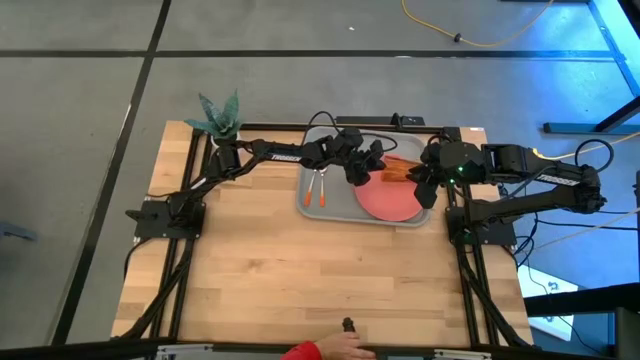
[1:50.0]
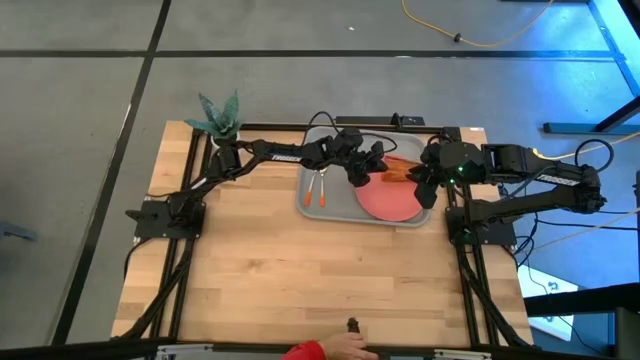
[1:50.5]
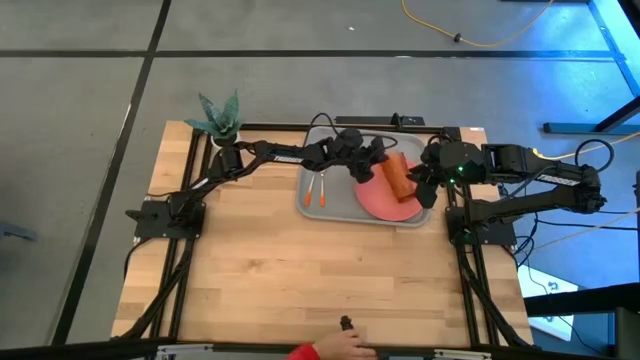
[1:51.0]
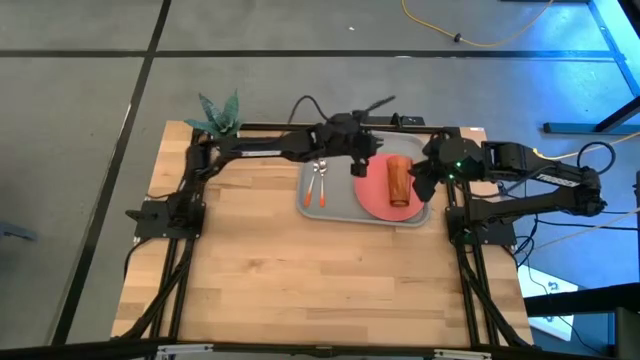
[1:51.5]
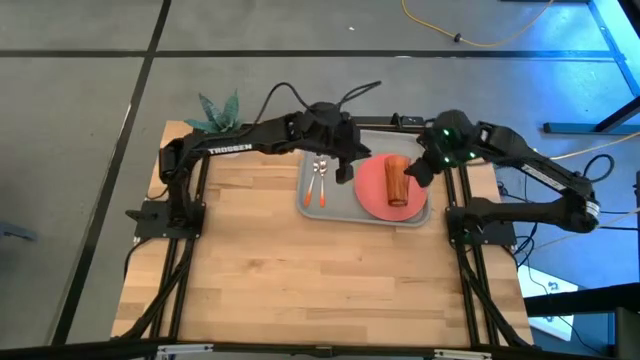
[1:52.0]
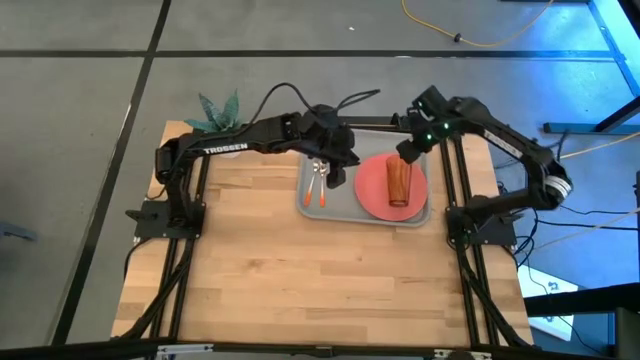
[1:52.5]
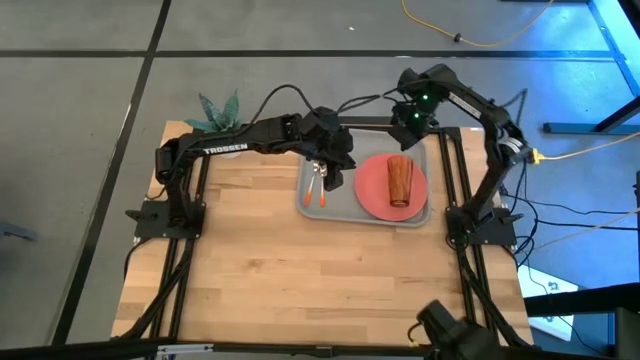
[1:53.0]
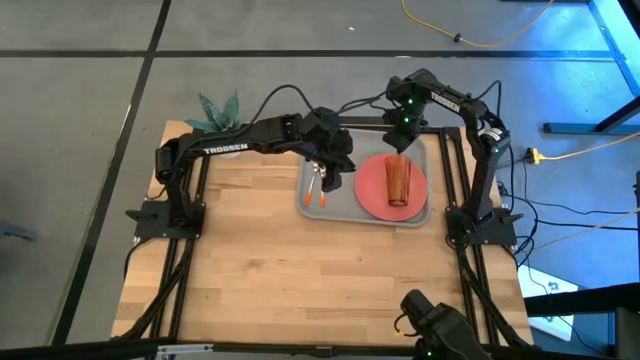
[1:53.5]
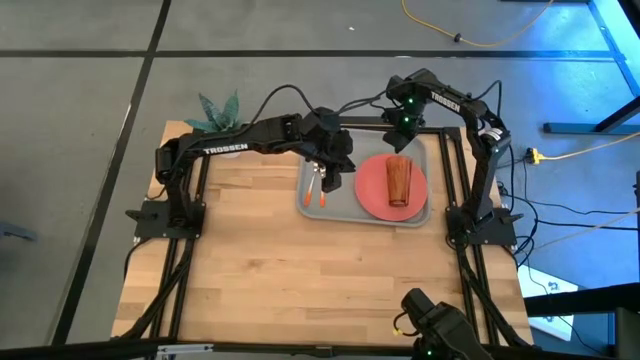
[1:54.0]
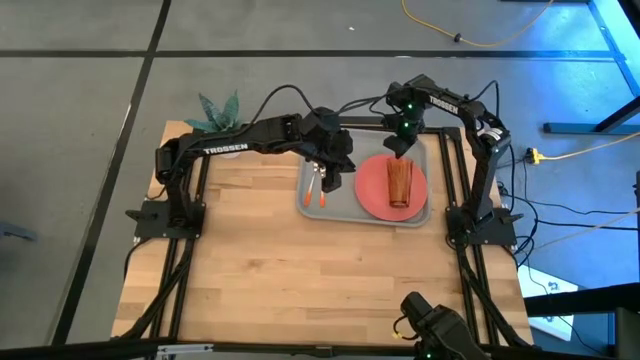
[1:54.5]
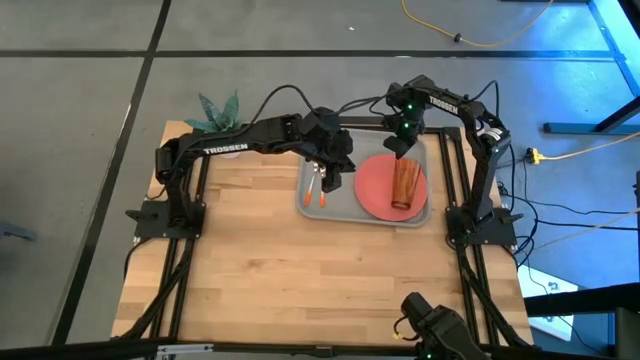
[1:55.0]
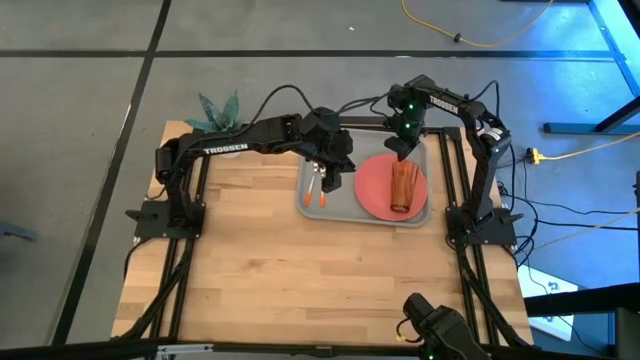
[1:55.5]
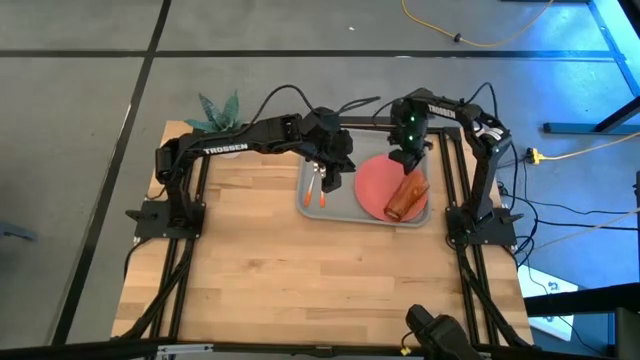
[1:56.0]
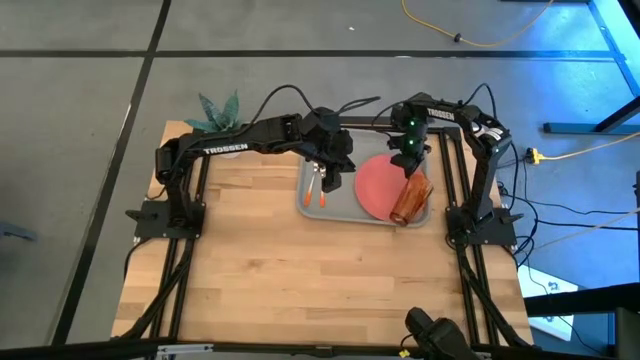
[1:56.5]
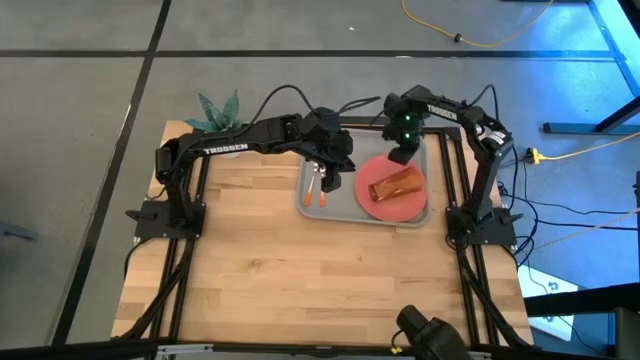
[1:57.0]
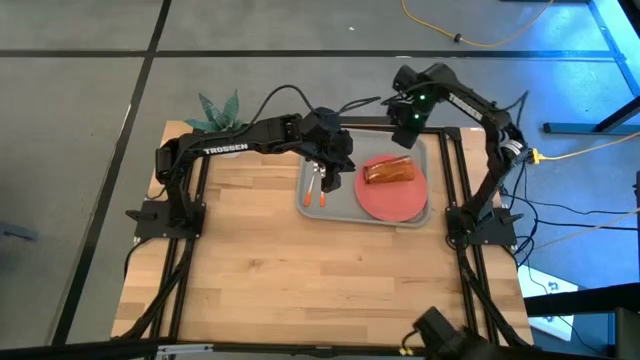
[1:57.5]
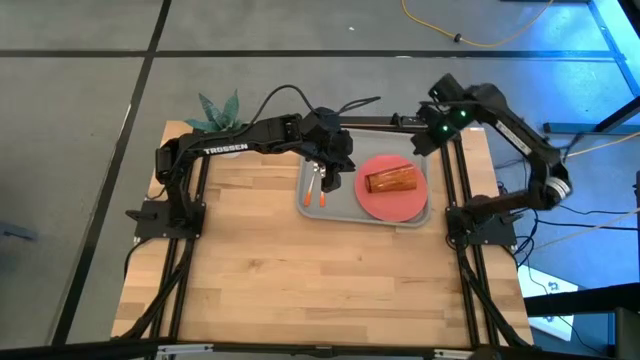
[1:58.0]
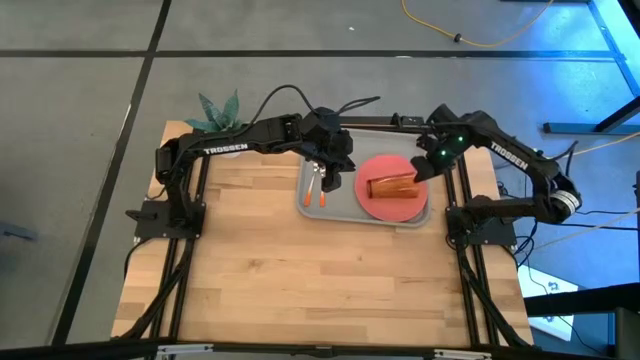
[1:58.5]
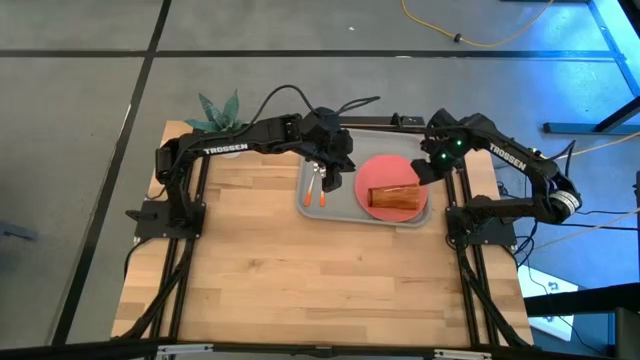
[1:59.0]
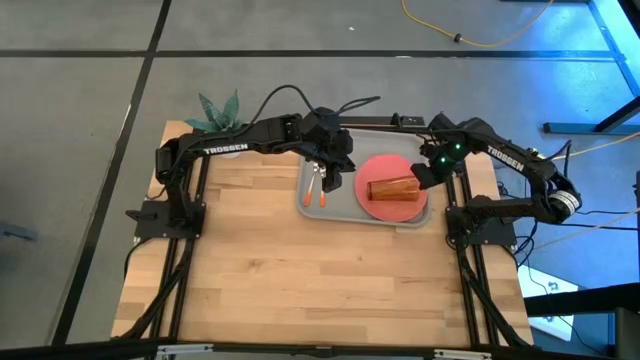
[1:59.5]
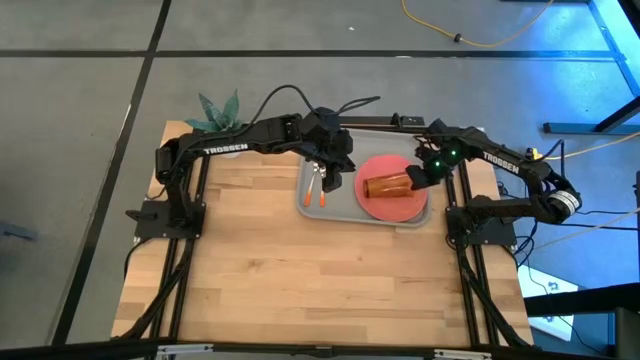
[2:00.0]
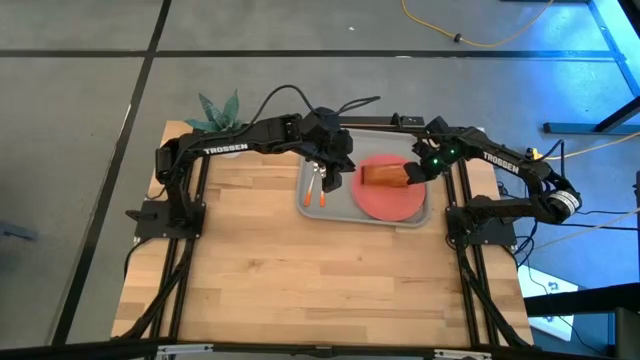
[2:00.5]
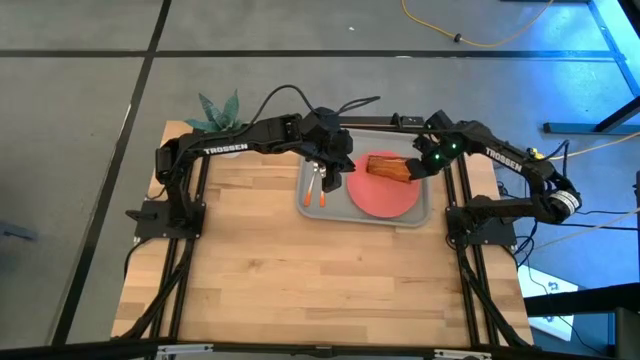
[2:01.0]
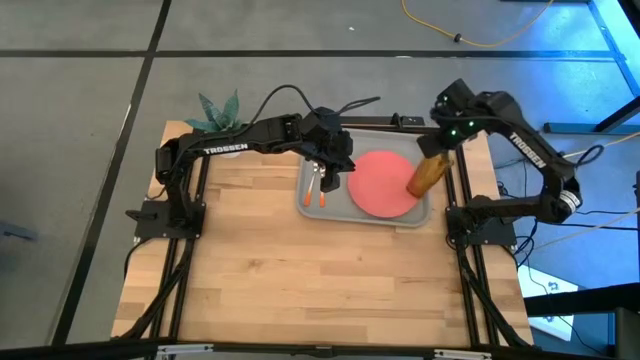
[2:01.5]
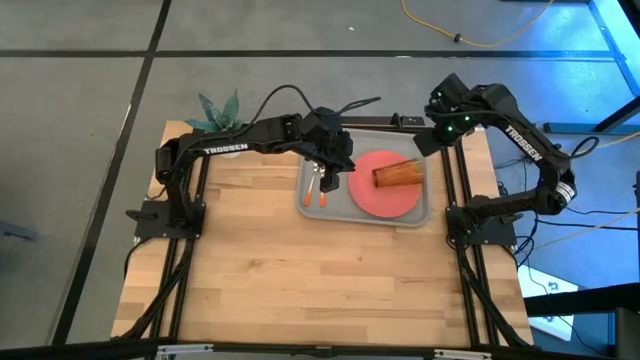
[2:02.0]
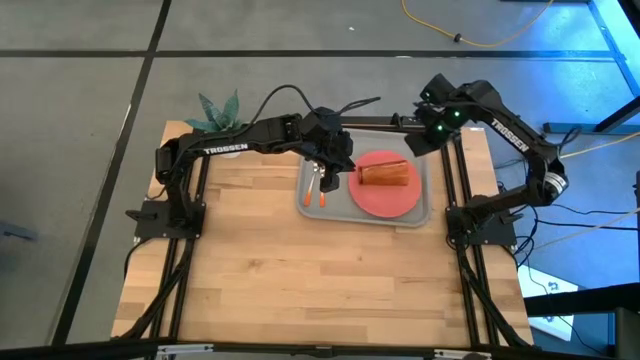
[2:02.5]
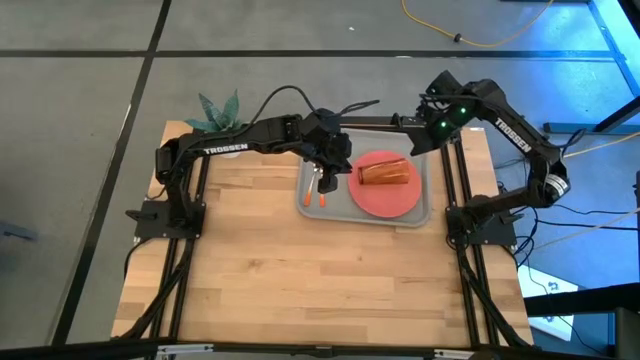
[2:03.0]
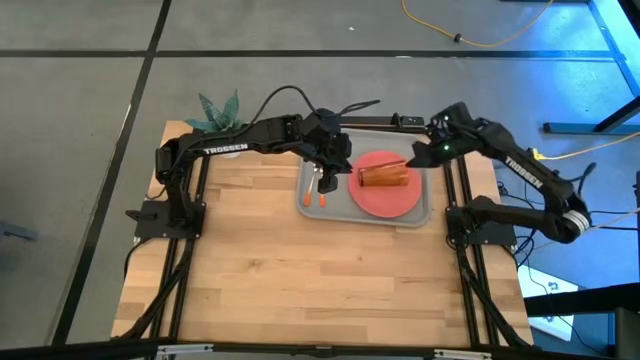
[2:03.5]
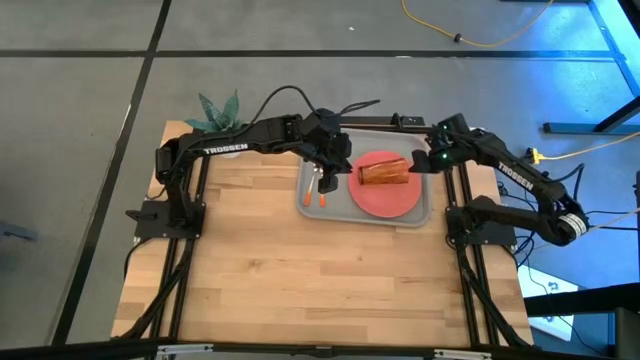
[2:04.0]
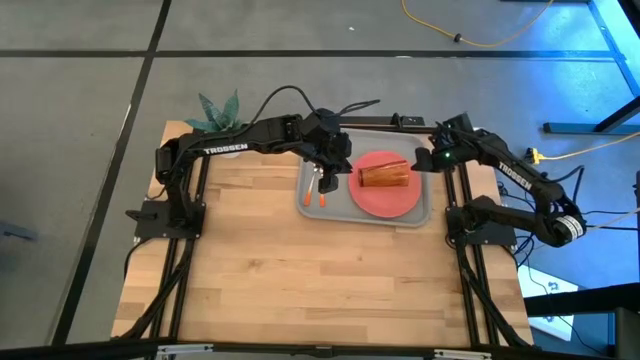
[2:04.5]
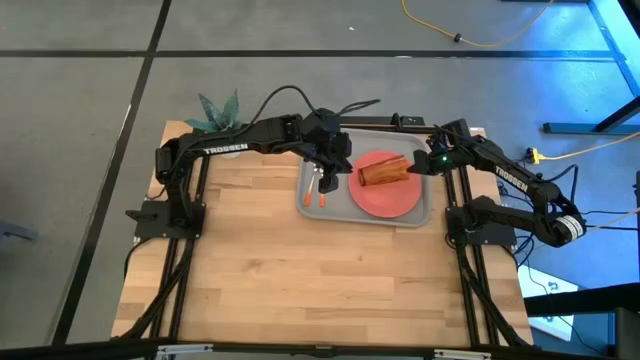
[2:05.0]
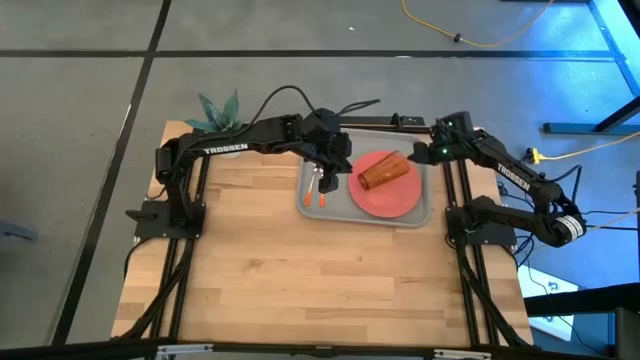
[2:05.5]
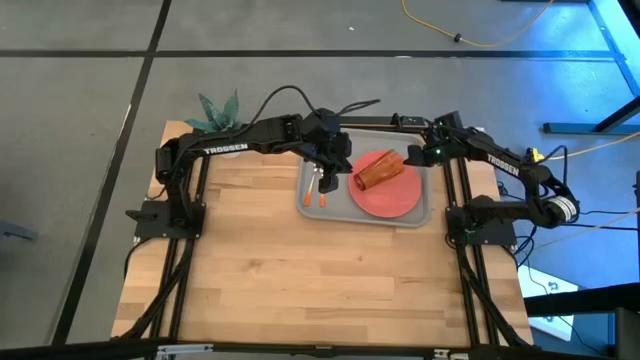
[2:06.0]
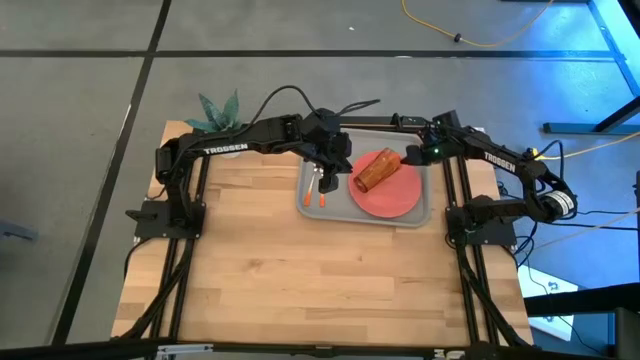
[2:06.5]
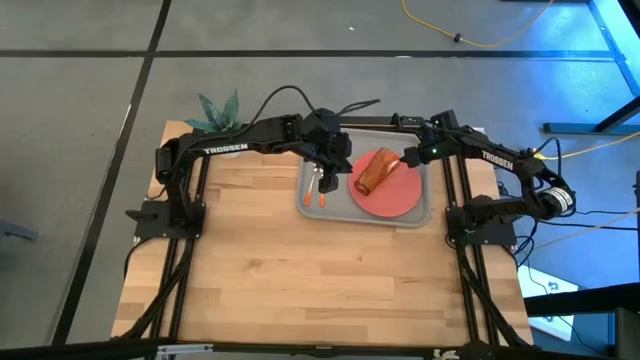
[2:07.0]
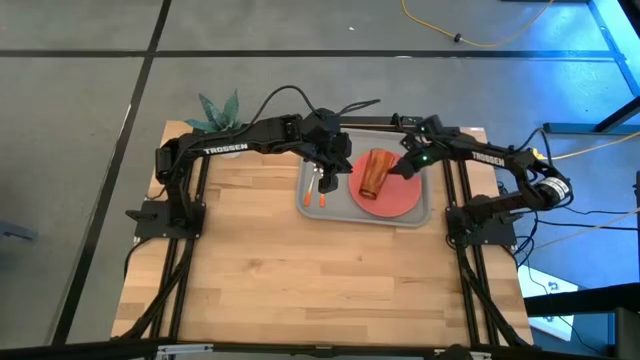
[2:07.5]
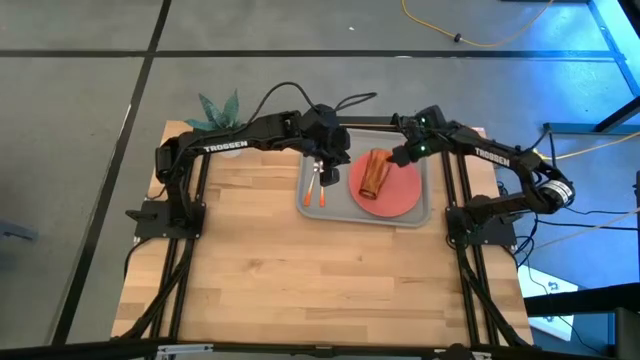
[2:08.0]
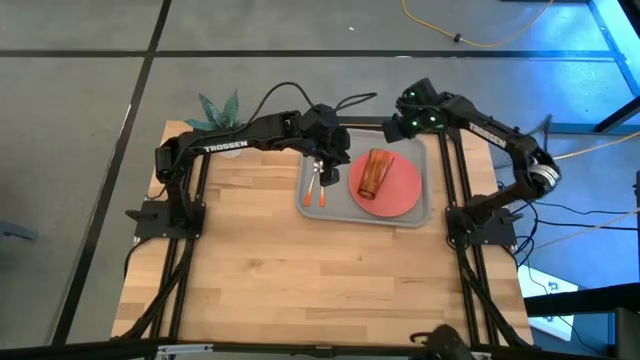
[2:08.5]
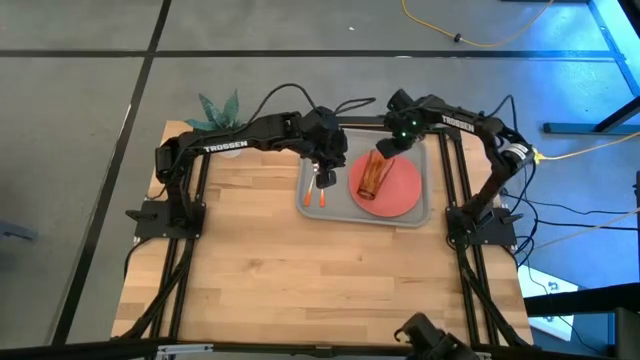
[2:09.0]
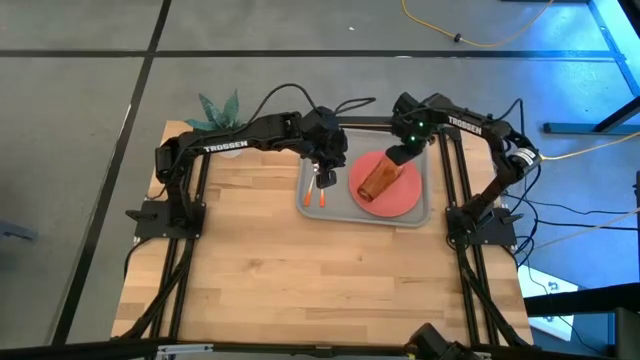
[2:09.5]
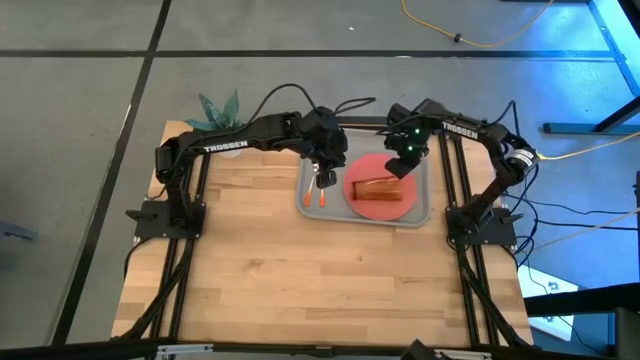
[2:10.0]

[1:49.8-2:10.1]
Task: Pick and place plate/cup/fork/spoon on tray
Adjust the orange glass on the gray serving tray
